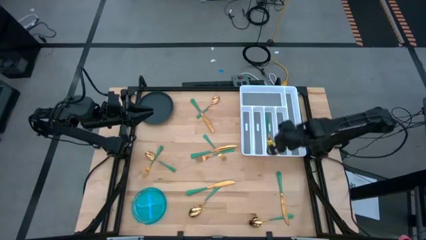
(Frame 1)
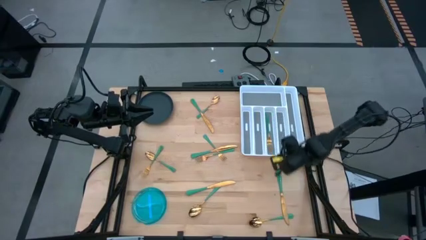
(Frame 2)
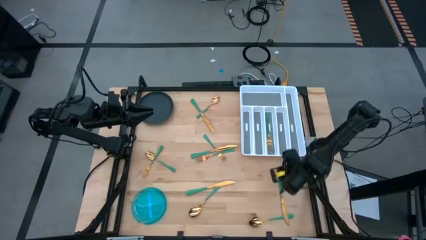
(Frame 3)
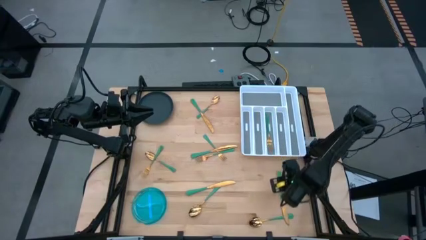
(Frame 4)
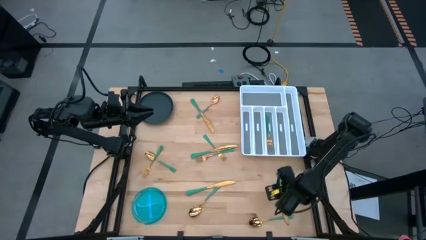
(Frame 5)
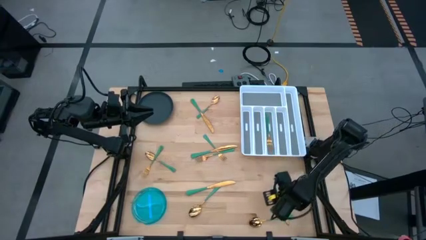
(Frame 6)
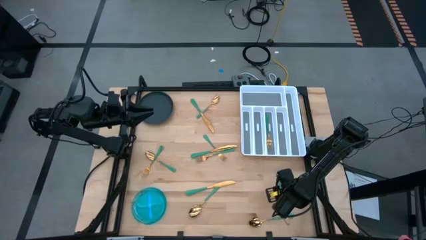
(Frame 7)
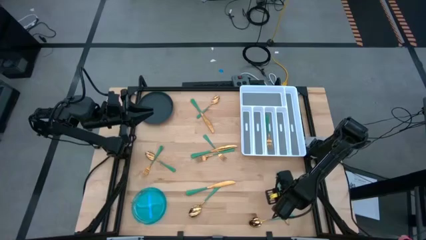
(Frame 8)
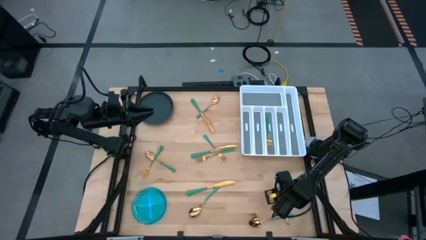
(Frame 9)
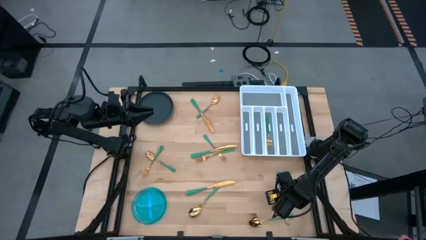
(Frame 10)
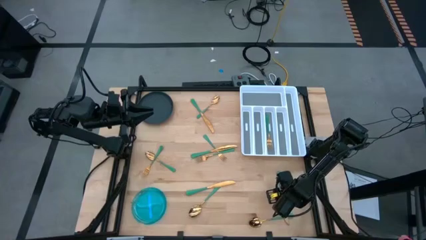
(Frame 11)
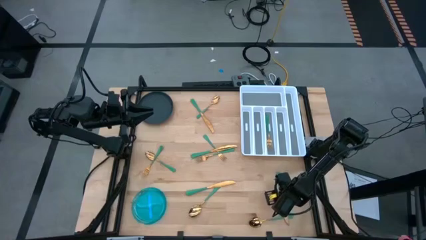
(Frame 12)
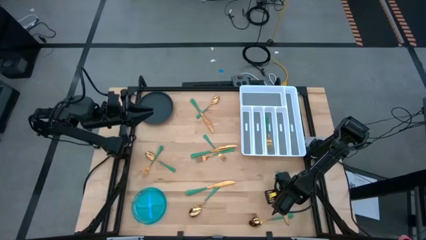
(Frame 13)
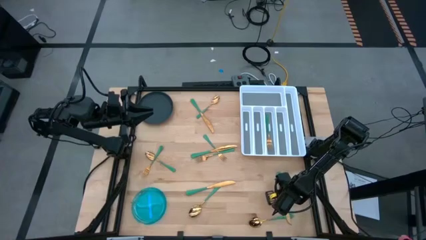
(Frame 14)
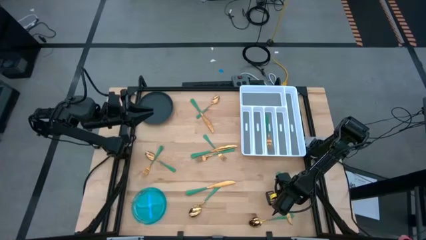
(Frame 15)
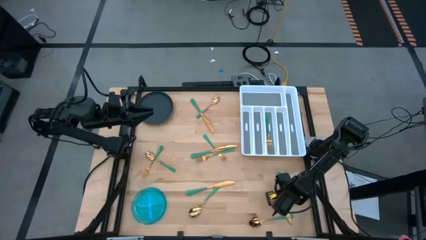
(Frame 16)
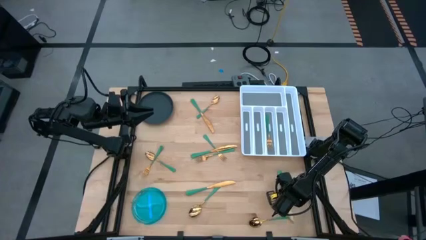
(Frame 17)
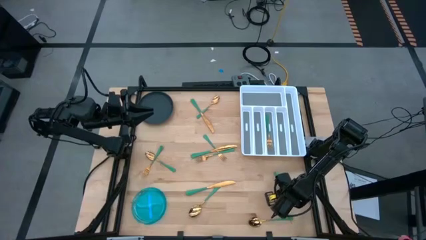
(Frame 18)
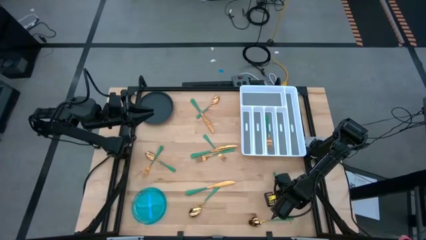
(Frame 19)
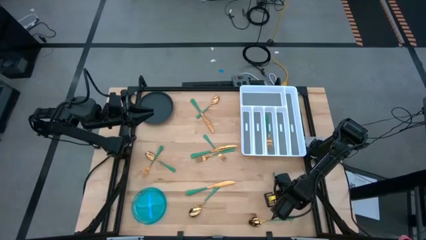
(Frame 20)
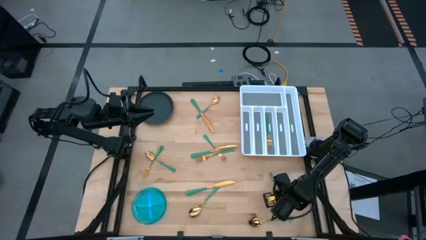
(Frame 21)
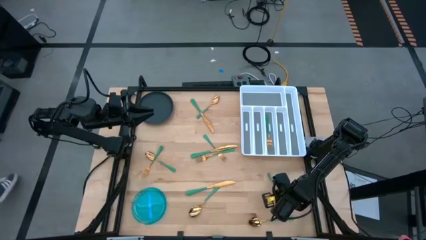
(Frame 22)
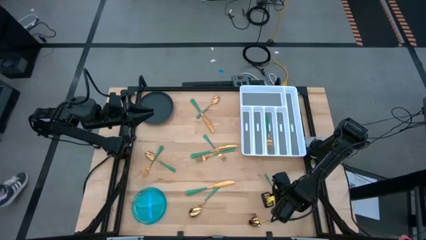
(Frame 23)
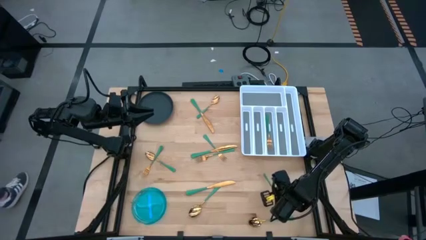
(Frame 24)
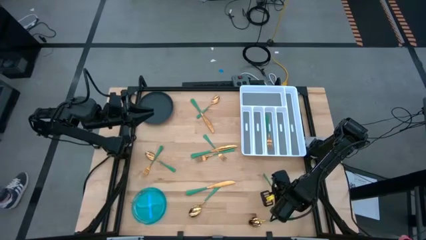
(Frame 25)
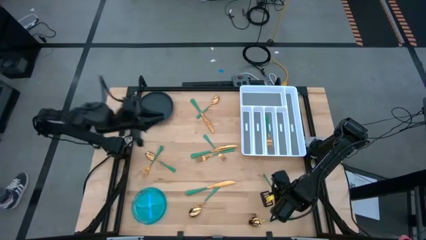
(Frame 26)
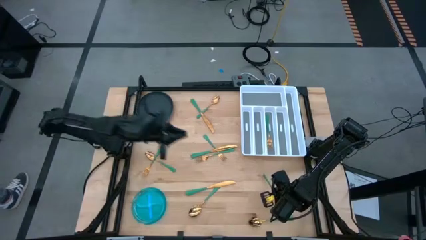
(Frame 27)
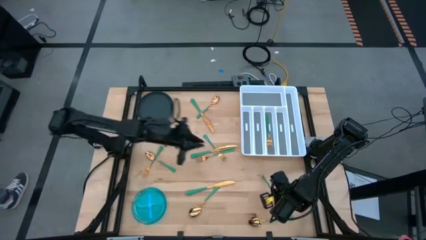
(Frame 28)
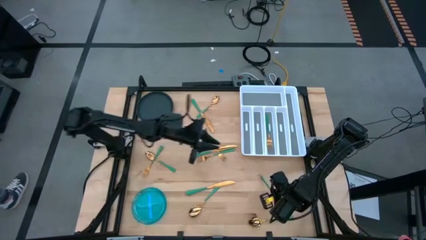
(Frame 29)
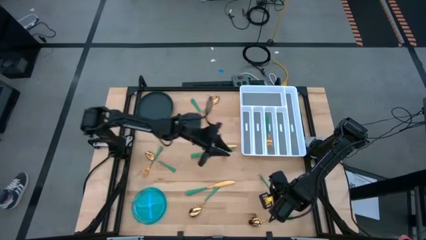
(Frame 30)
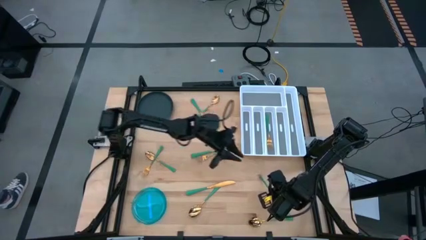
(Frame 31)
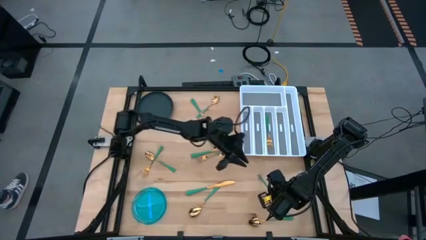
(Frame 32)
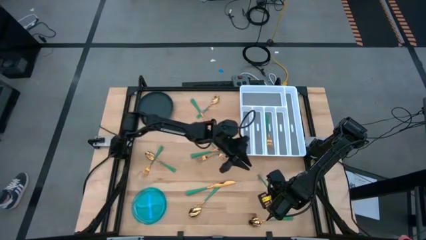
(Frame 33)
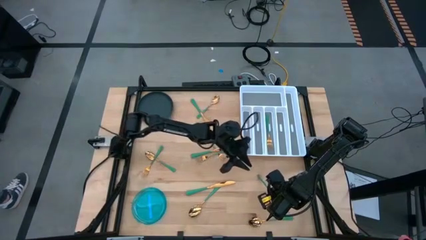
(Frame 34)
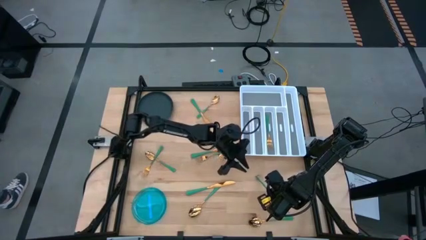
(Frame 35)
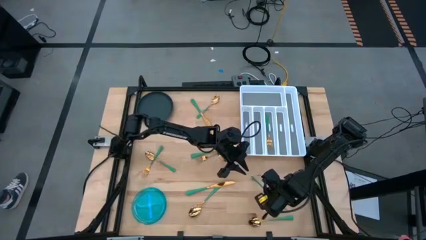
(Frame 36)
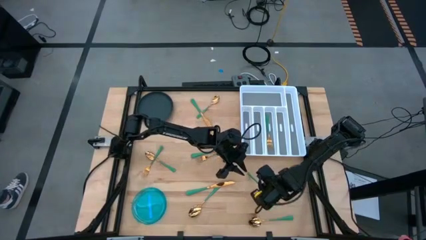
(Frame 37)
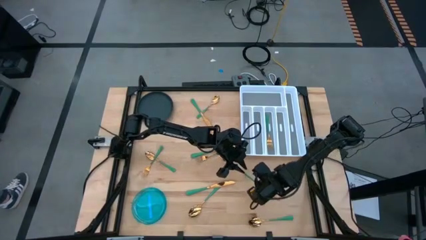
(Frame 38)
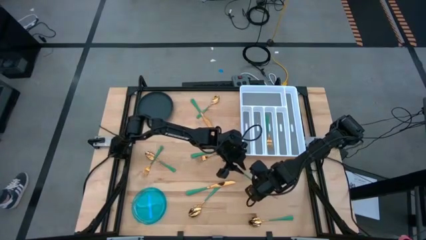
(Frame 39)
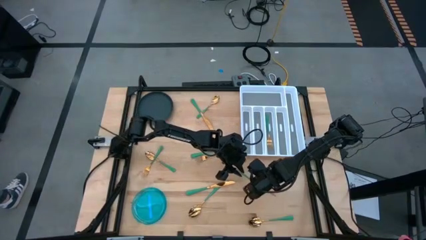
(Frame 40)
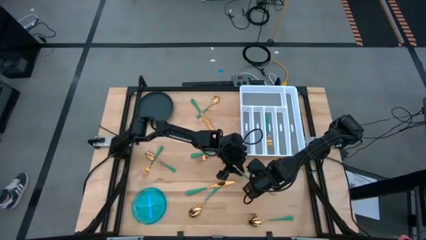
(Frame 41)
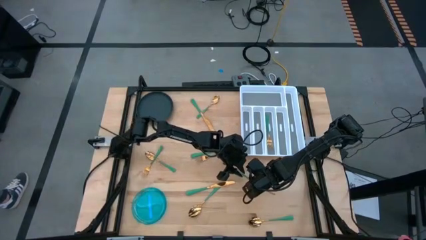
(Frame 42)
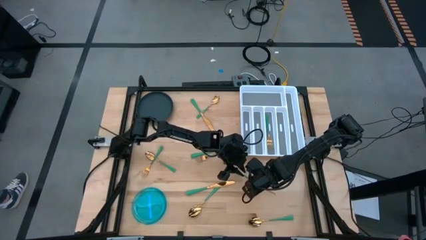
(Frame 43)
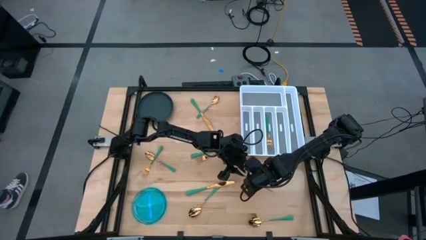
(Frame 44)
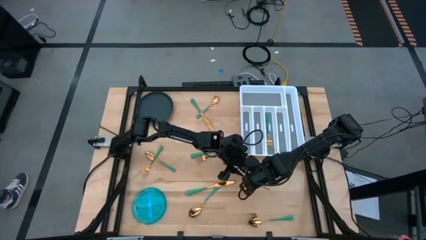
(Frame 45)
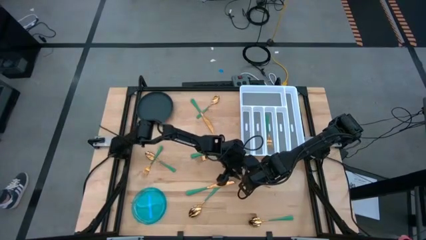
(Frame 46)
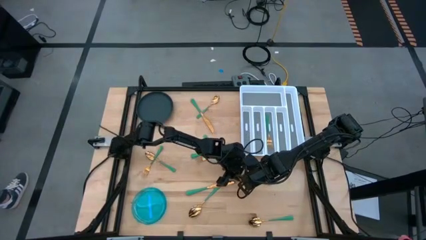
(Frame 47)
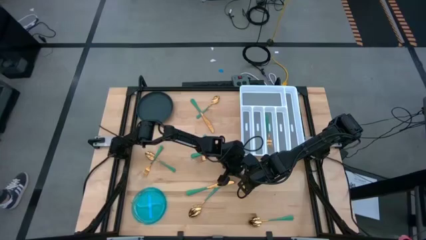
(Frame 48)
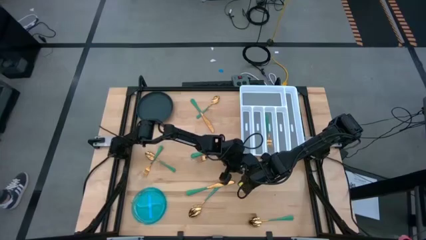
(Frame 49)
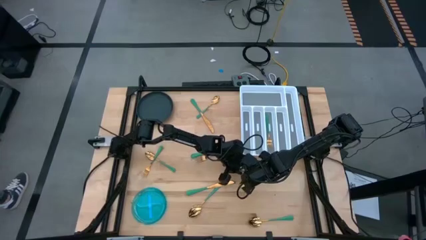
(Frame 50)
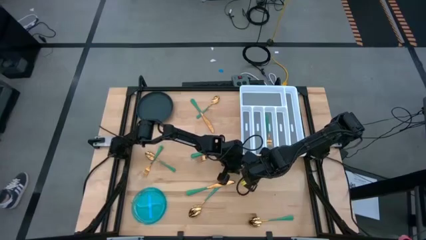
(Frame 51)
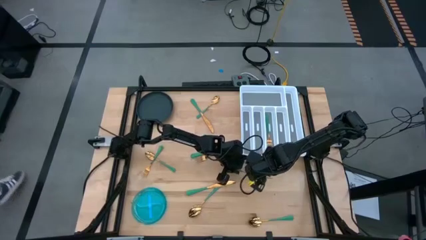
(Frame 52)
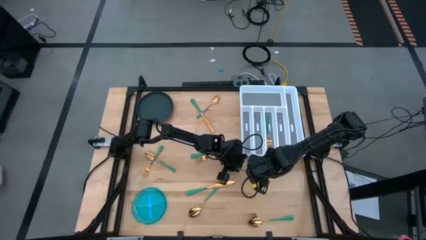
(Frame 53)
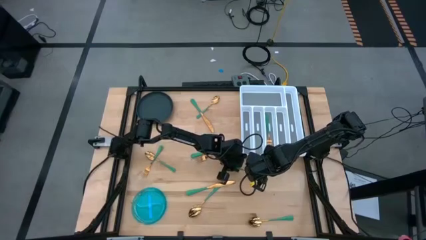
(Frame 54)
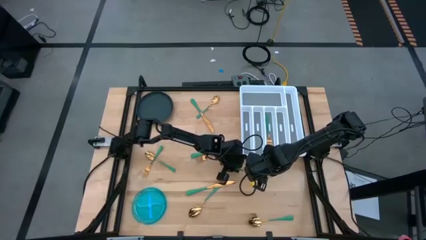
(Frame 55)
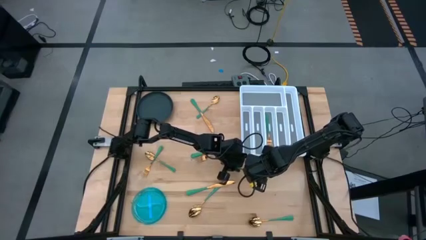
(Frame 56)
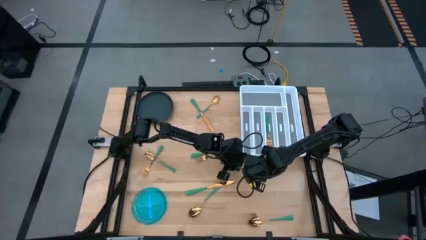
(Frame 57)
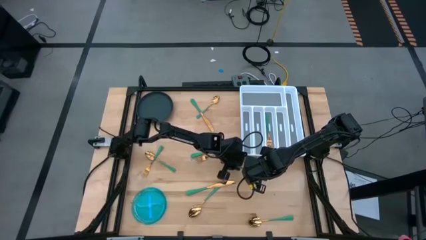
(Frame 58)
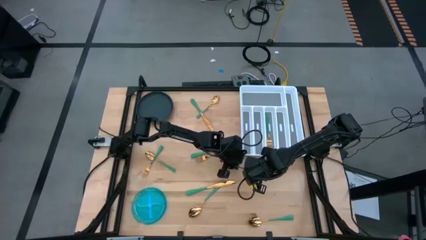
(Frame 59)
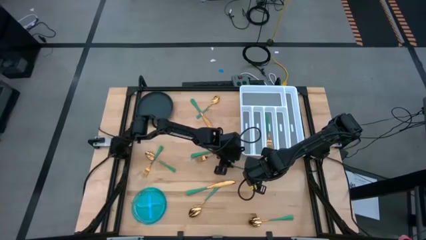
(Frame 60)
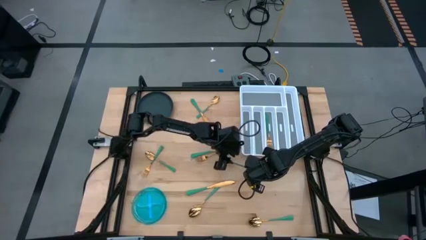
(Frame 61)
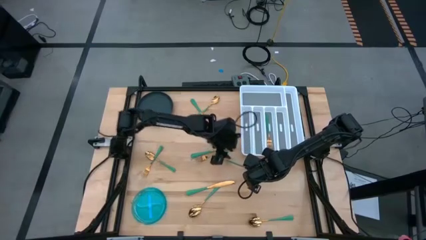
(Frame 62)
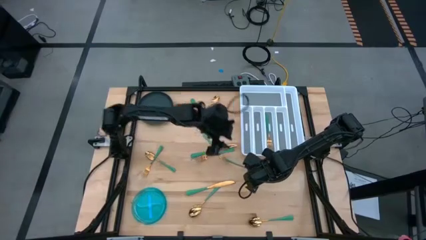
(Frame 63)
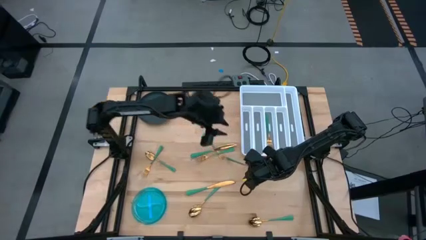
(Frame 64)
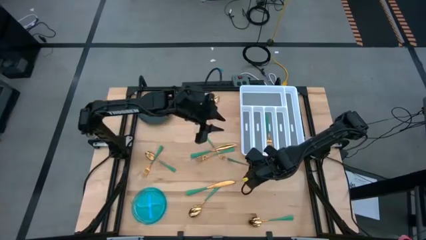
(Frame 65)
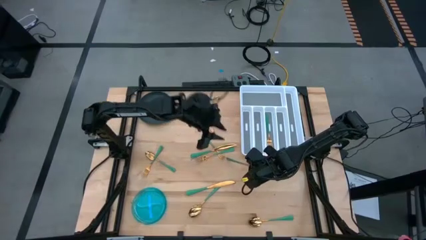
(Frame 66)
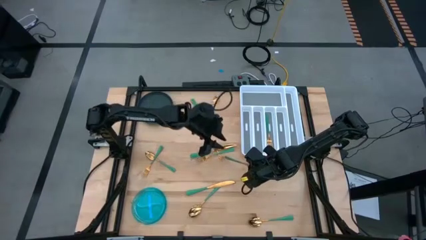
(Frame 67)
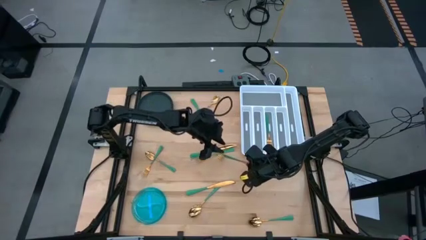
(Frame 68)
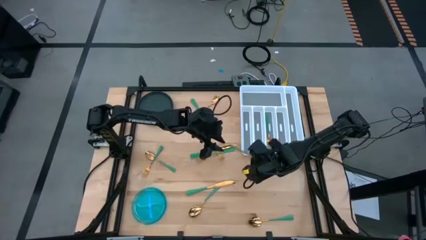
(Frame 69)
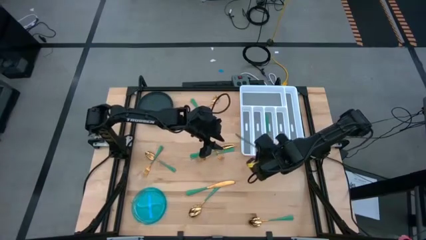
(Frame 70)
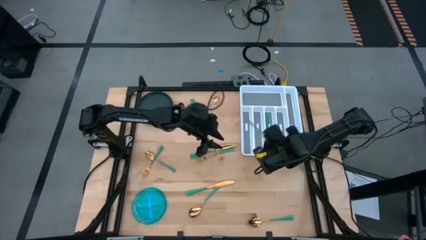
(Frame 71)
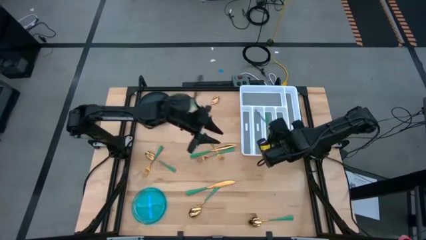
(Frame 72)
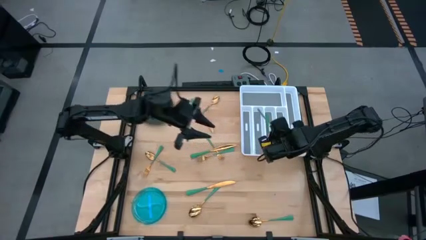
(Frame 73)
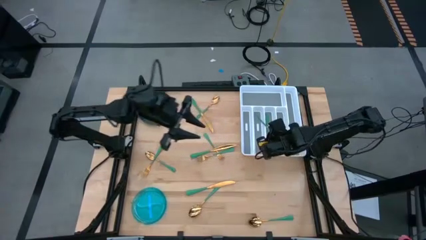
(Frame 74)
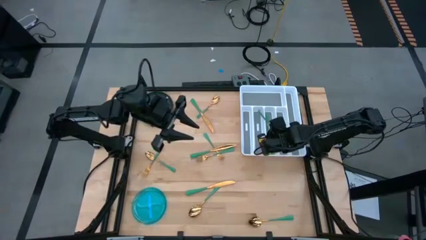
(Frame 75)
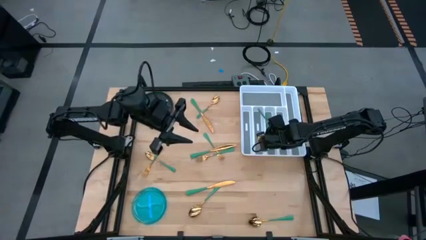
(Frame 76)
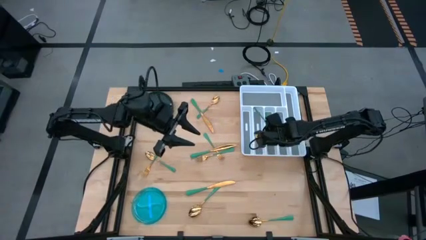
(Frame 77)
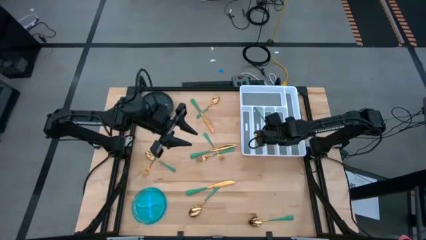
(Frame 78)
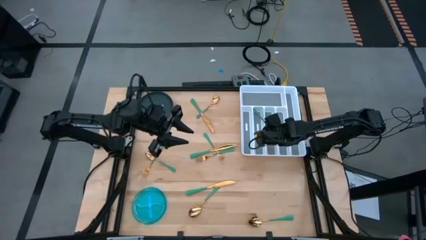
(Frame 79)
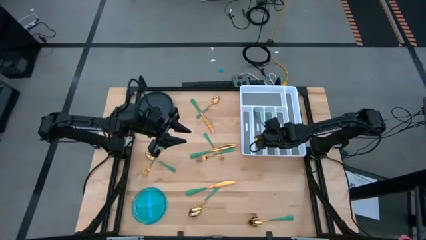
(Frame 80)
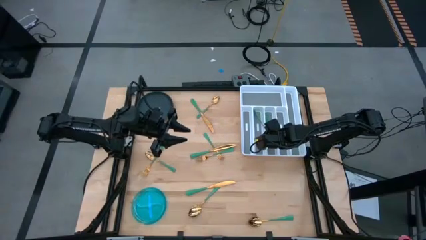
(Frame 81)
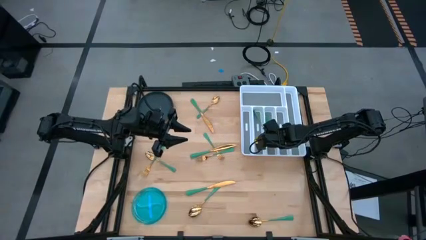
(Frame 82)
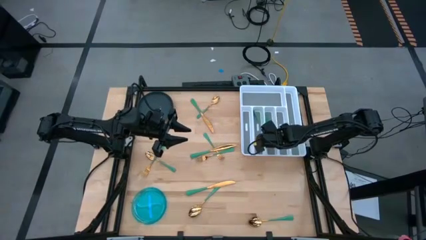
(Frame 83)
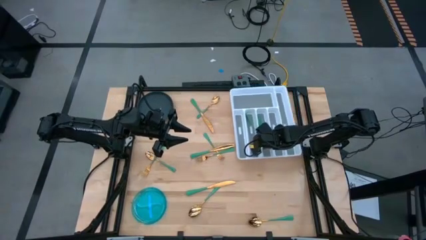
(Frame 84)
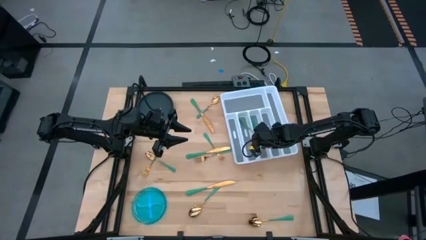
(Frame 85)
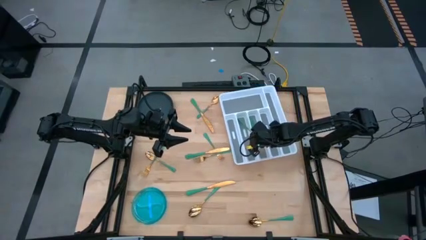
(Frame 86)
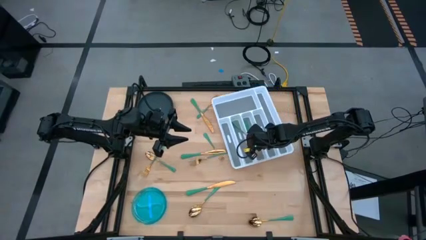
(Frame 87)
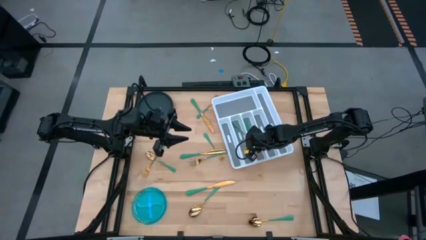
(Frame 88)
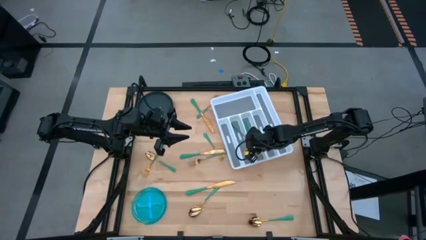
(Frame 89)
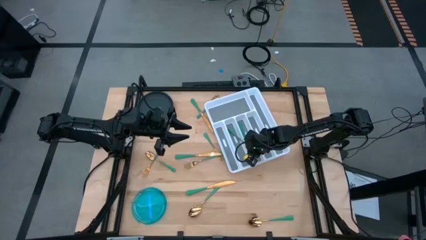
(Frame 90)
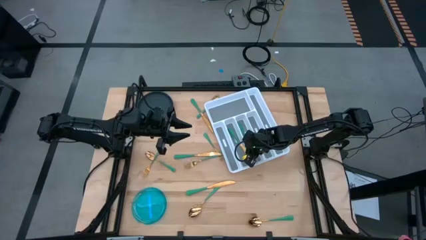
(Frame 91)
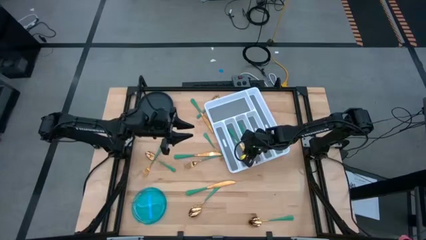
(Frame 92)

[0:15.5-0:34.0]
Task: Sort silverware
Put the bottom right green table knife into the middle left slot of the white silverware tray
